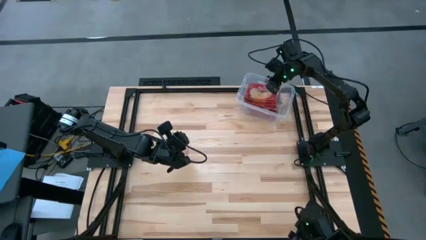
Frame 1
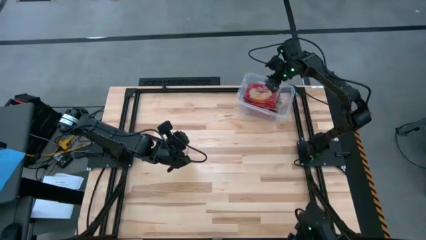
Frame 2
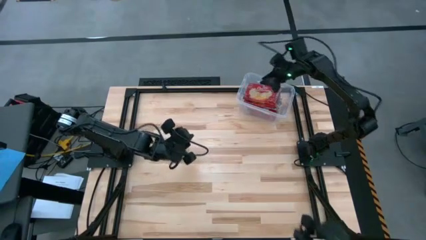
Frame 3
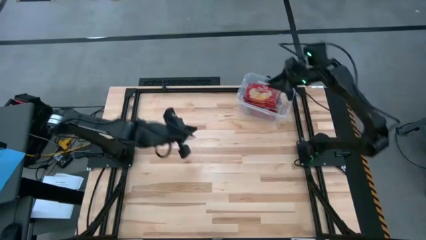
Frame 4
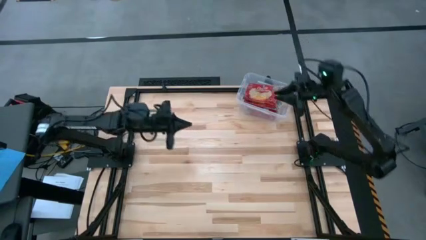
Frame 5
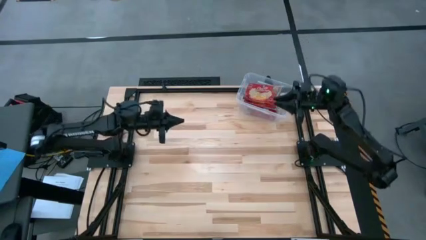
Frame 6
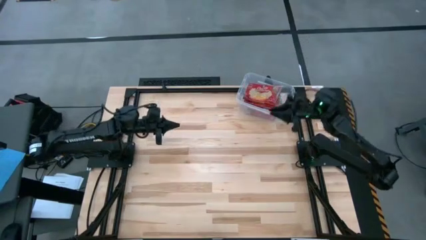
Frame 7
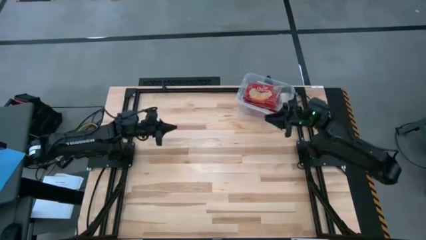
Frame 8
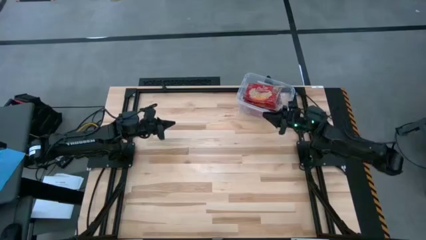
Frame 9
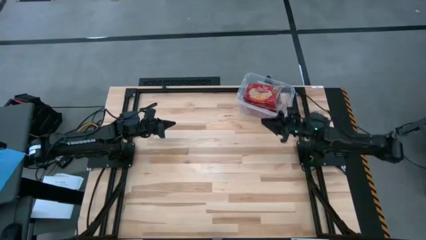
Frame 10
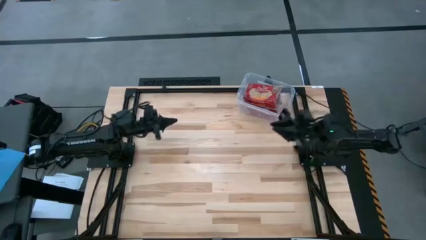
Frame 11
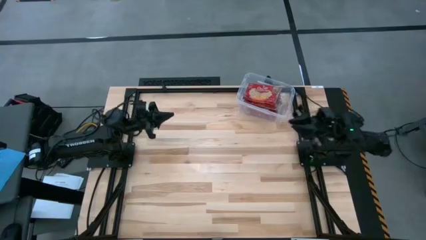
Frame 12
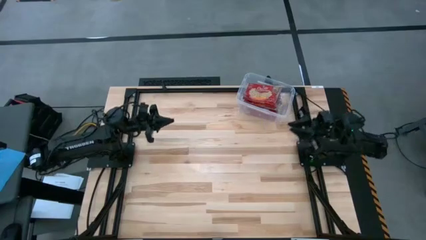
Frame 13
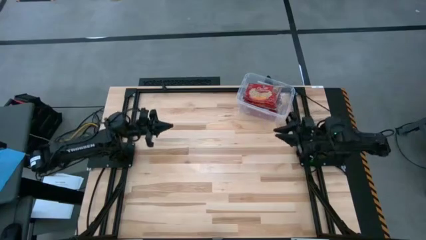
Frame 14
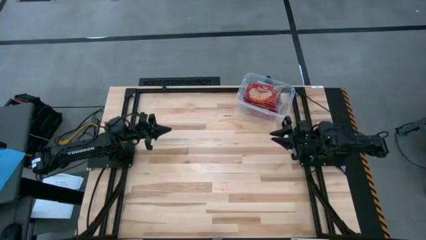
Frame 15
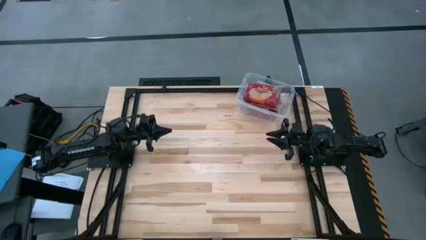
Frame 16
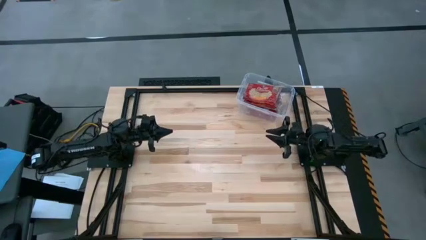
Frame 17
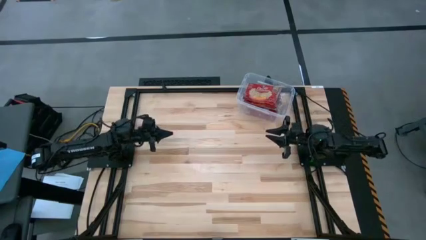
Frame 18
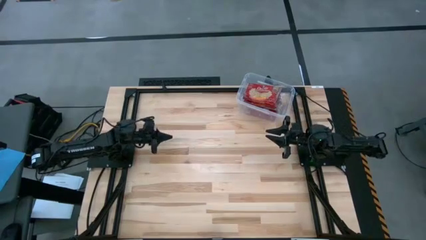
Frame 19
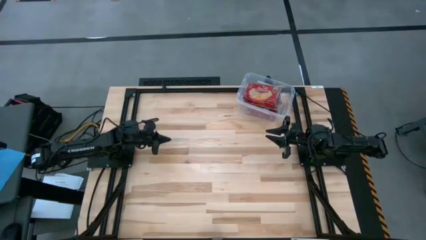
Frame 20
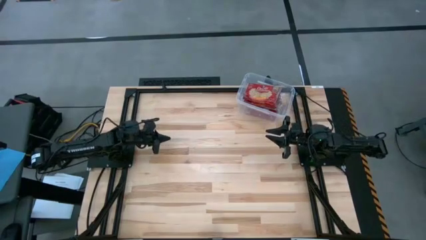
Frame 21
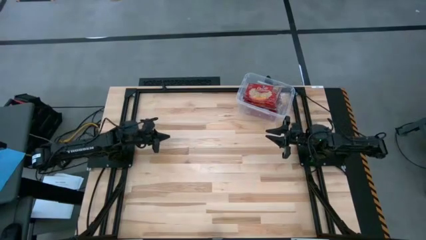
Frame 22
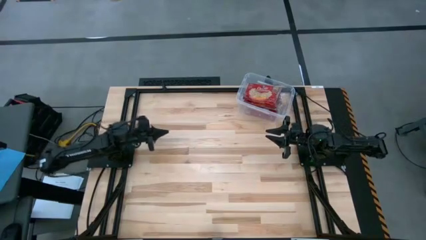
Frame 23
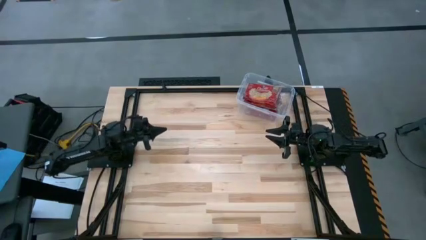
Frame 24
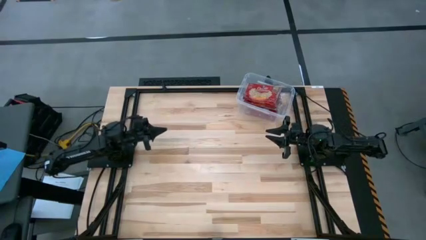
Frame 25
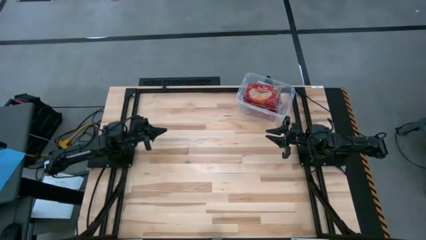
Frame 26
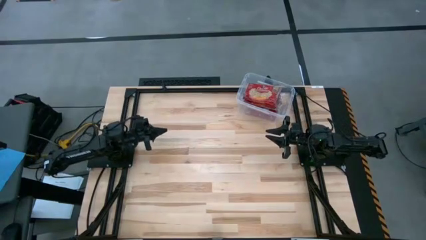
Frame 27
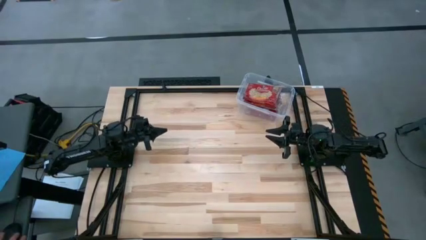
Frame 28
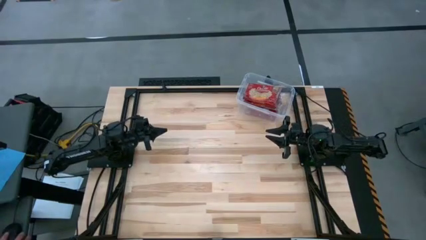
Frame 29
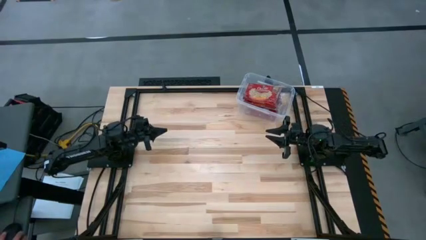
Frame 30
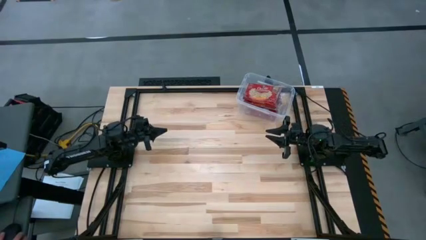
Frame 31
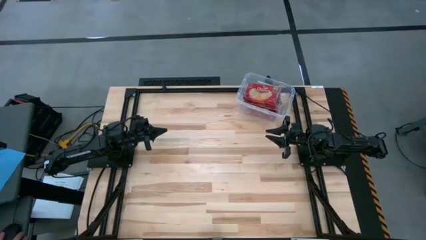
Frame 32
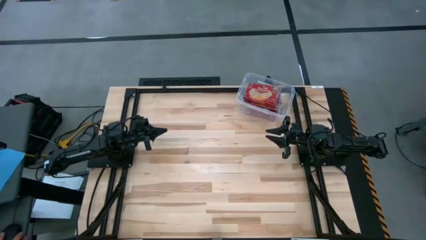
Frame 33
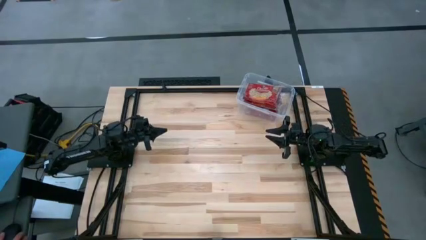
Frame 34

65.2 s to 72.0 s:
Task: Sort popcorn bags into baskets
Return to Home Position

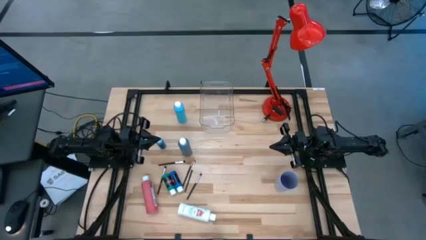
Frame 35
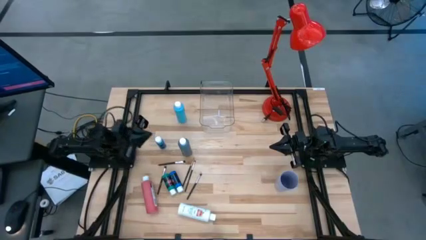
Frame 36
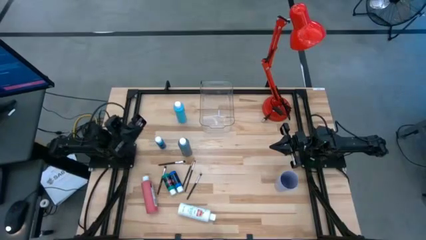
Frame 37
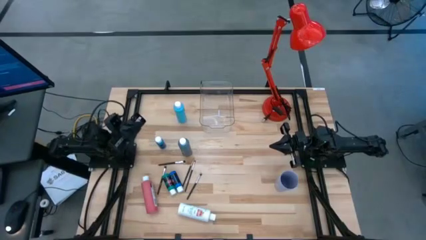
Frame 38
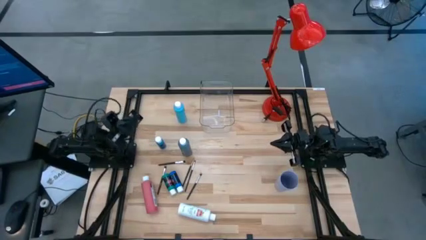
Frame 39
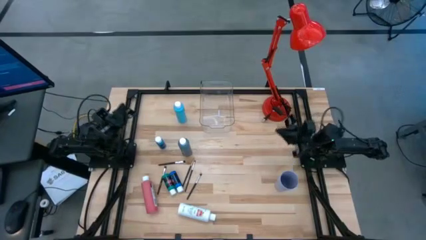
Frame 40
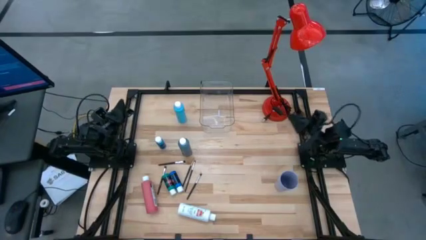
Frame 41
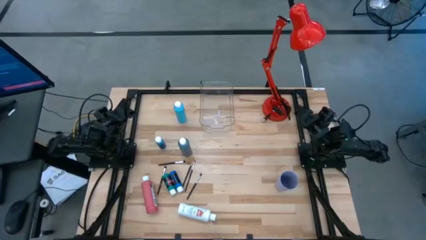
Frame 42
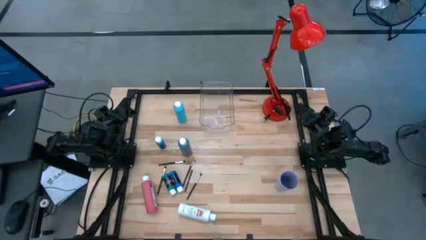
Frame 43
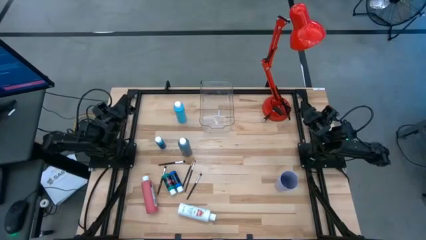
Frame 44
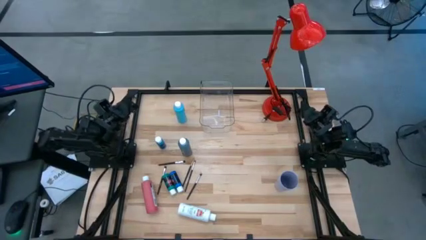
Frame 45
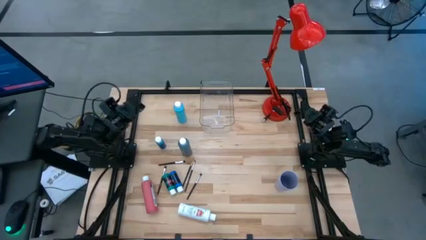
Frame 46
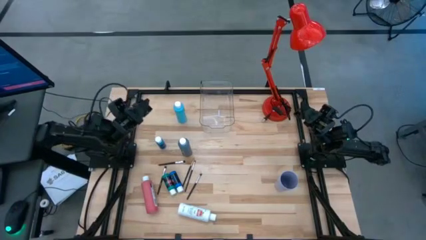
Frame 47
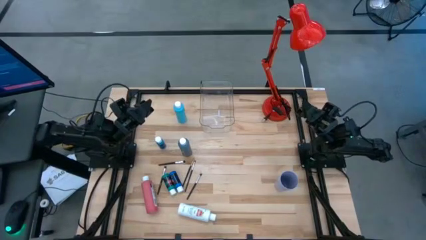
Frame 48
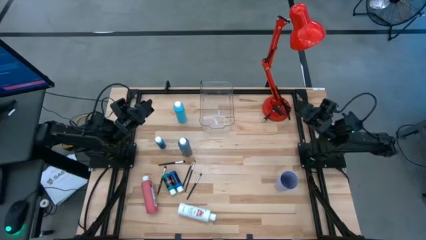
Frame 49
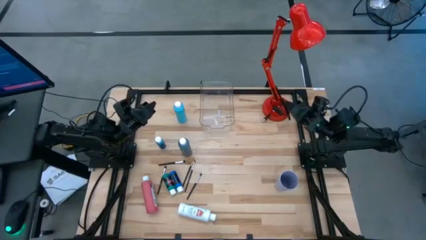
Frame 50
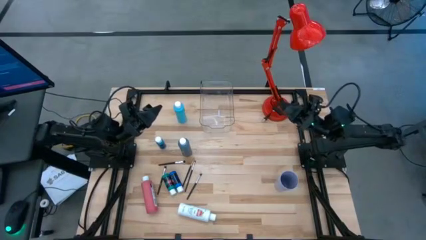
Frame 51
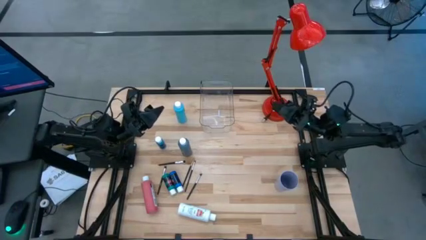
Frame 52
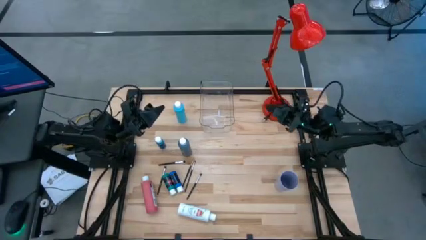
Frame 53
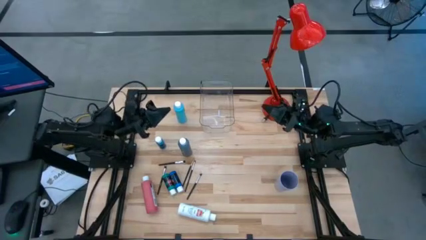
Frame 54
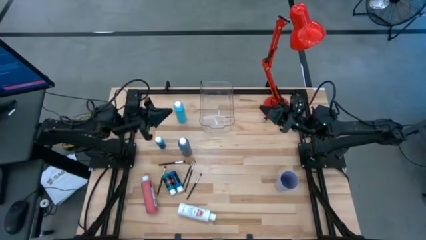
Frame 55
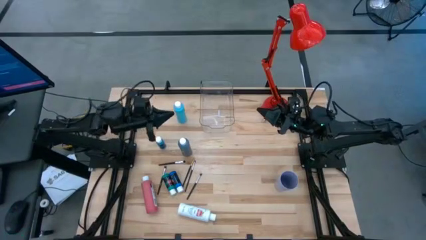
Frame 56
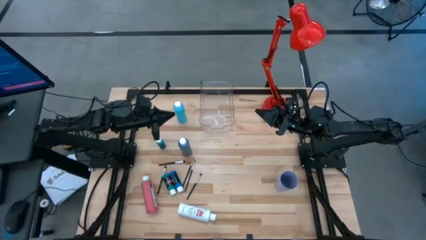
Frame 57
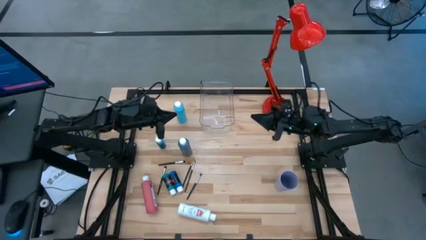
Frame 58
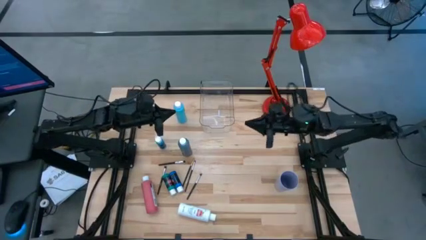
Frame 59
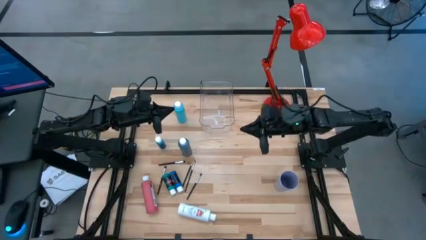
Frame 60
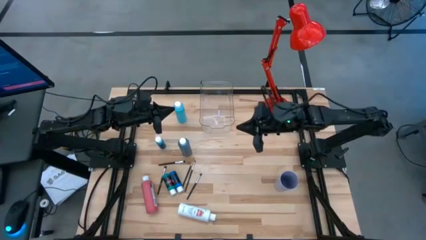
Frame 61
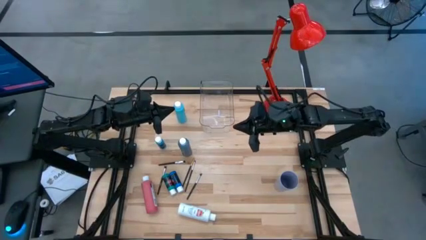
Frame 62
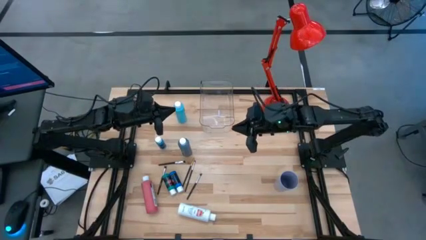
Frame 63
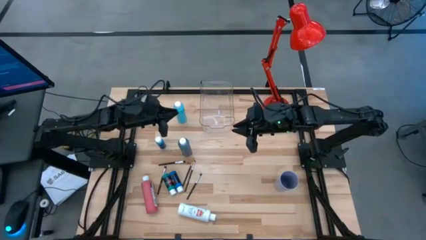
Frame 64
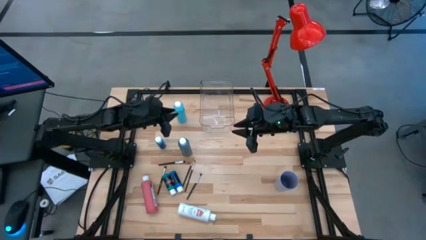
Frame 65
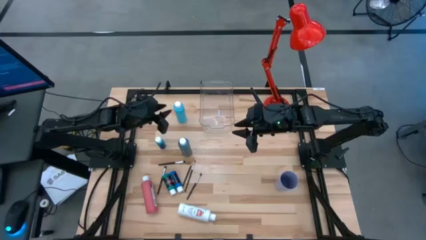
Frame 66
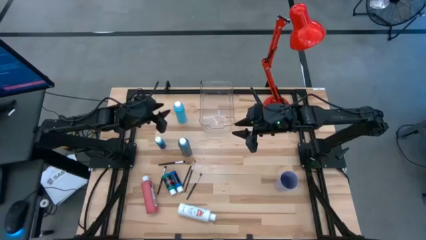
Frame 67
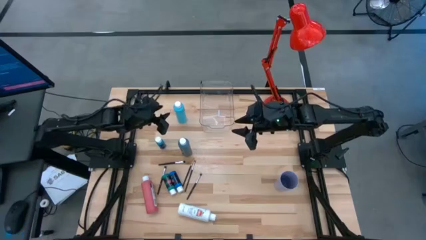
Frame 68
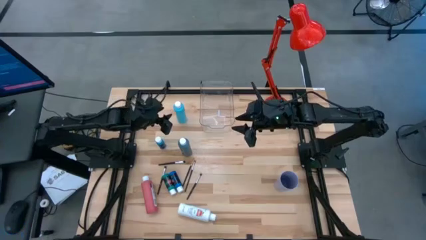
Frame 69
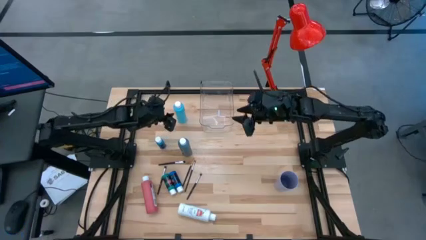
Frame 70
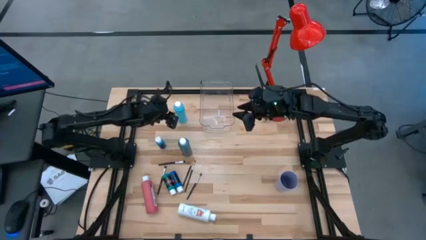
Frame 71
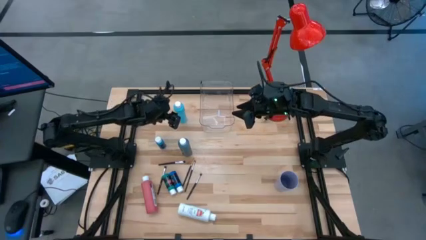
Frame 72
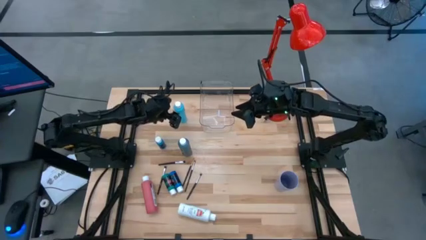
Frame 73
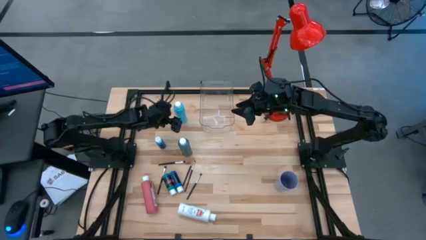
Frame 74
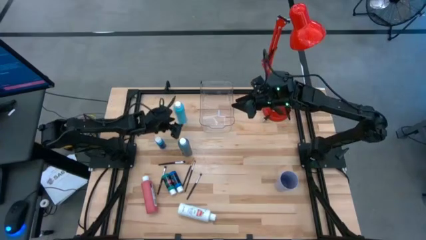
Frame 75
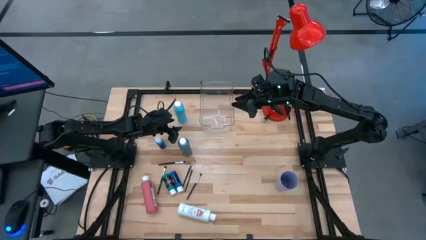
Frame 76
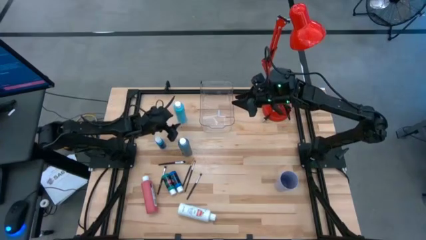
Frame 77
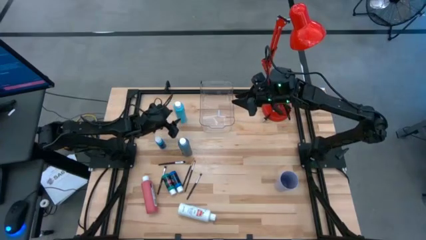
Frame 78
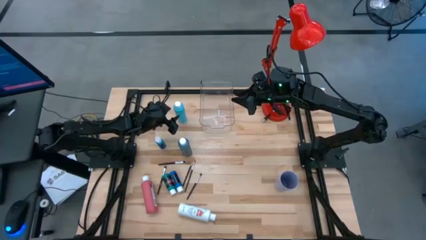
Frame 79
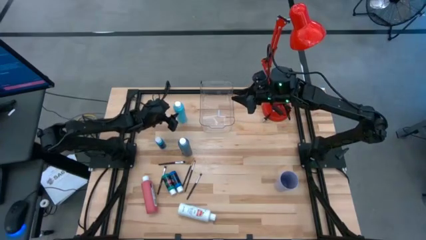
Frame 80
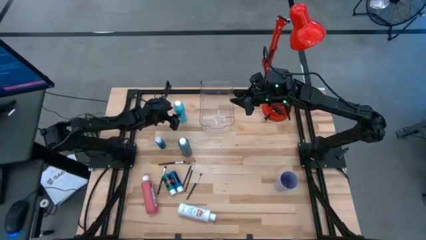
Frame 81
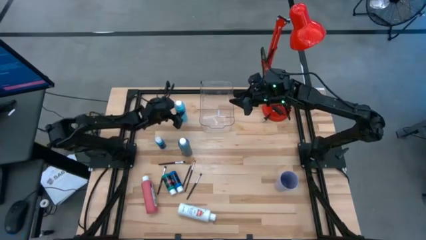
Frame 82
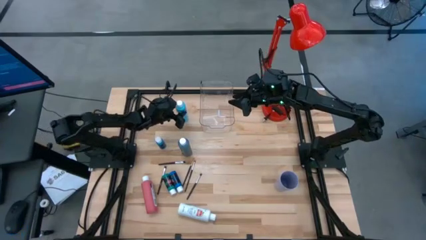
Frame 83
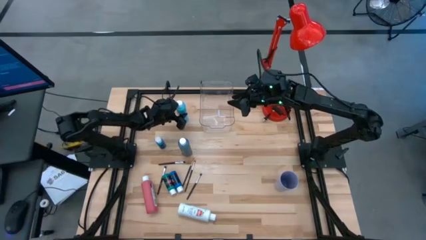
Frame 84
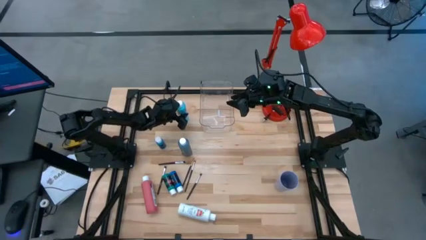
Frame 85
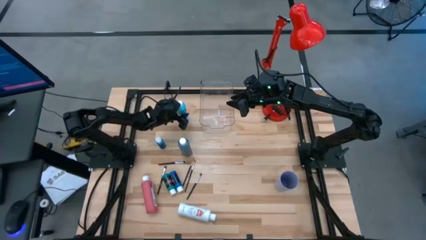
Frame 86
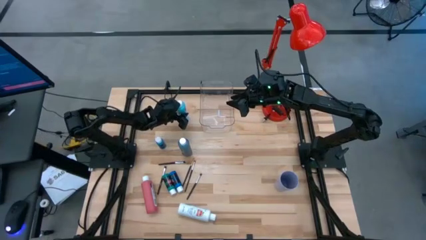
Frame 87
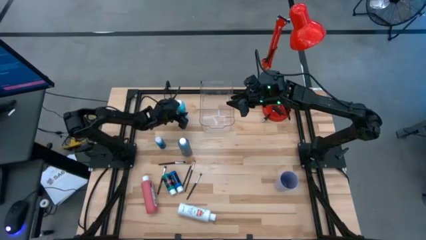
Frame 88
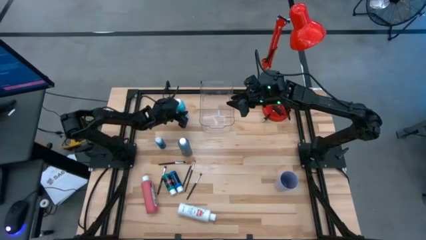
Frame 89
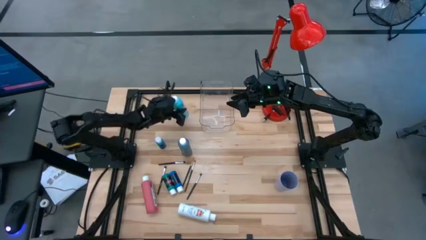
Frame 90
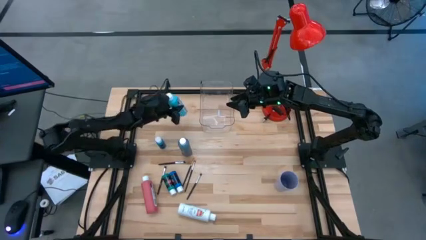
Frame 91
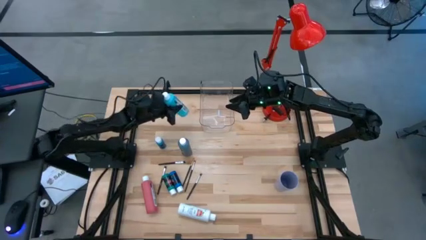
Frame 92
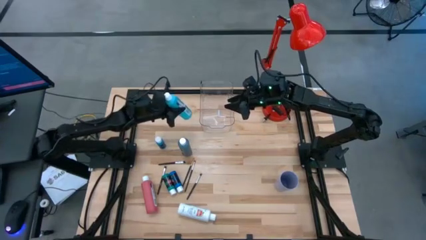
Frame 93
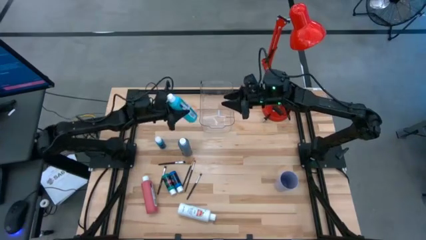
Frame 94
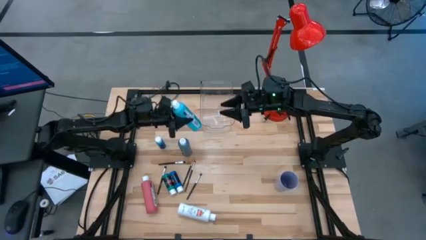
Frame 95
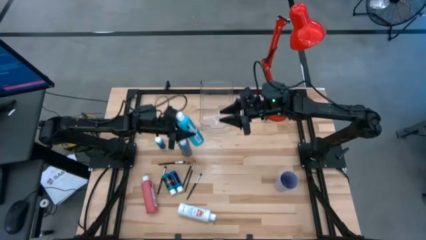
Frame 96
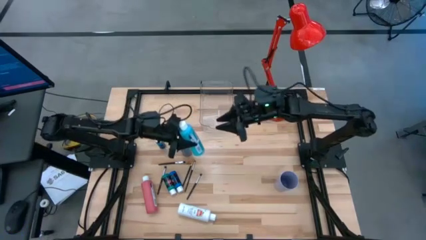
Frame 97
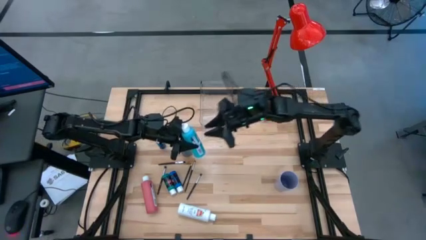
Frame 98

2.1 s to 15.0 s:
Task: Pick & Place Paint Supplies
Put the light blue paint bottle into the transparent bin
